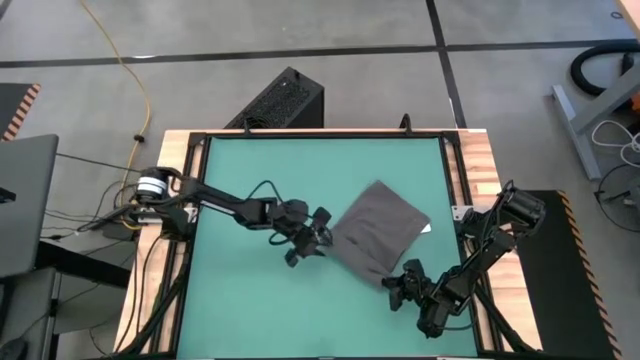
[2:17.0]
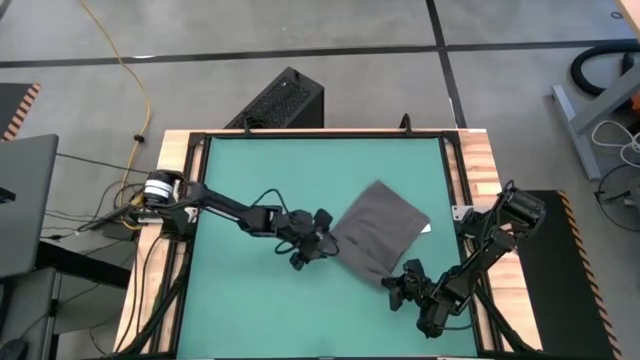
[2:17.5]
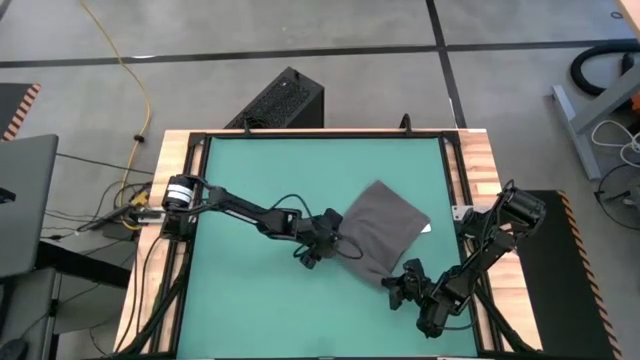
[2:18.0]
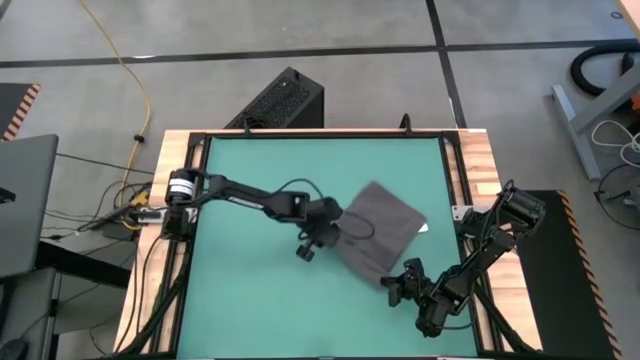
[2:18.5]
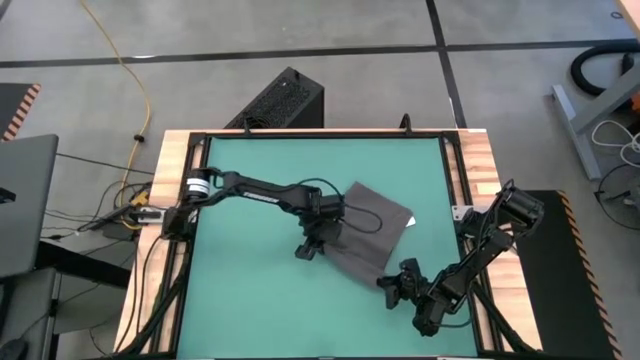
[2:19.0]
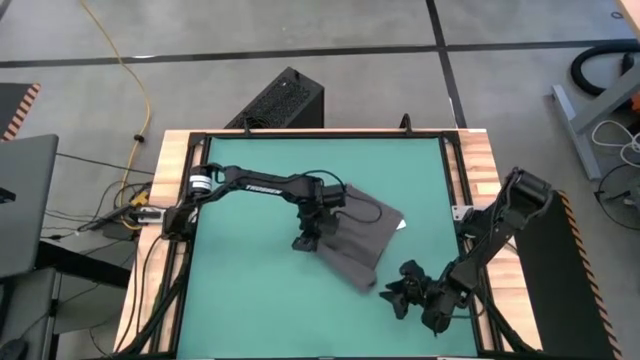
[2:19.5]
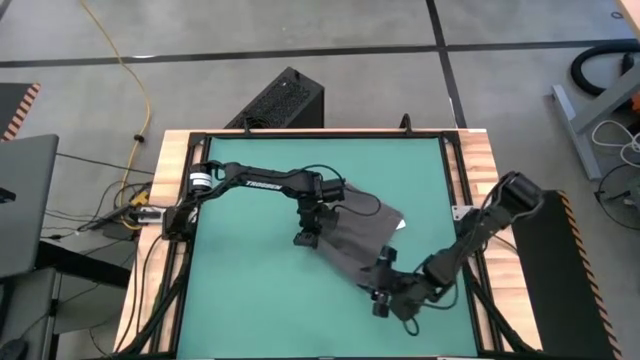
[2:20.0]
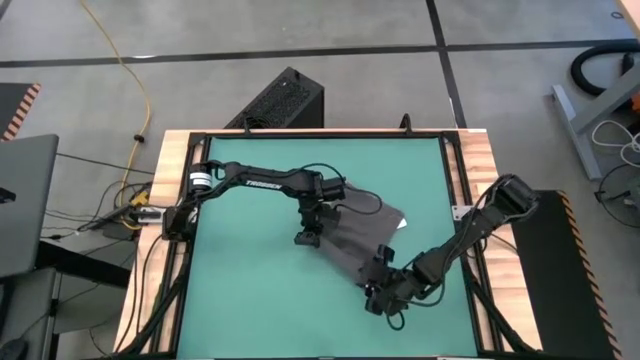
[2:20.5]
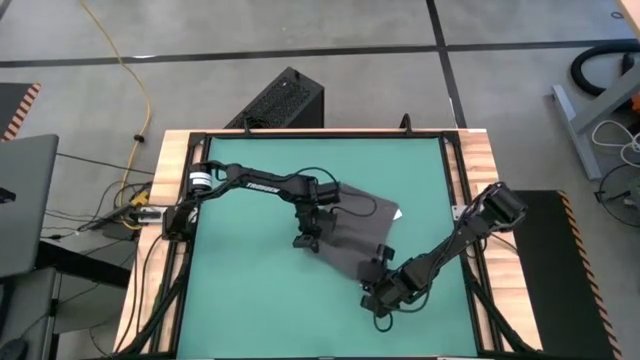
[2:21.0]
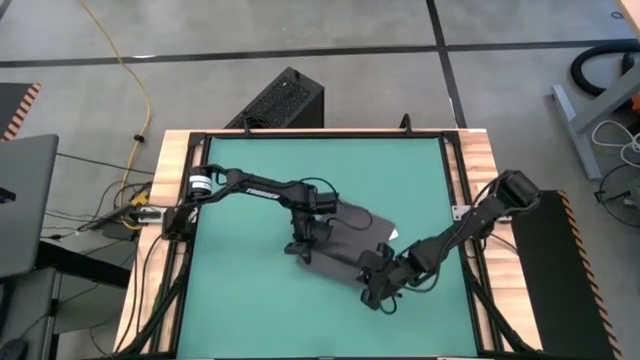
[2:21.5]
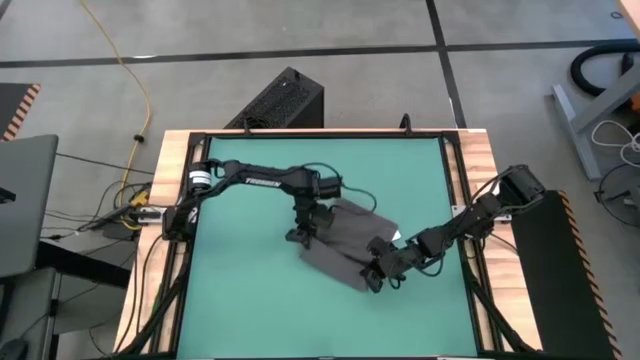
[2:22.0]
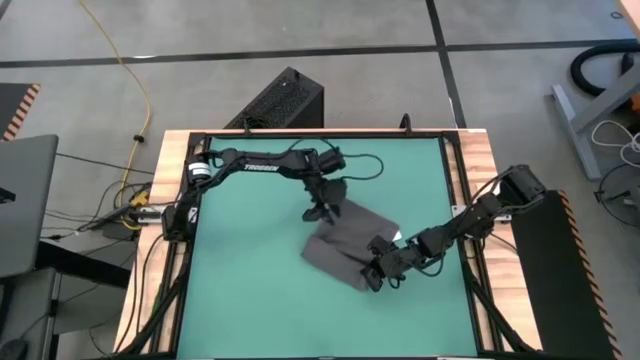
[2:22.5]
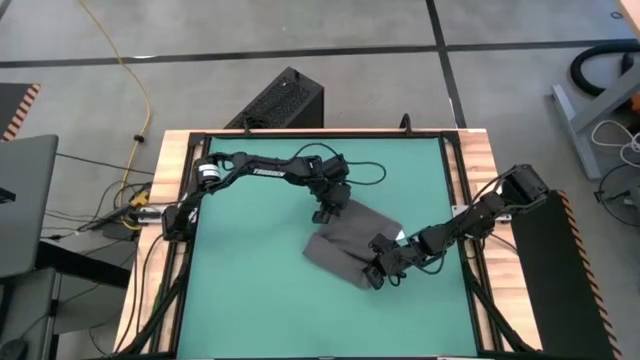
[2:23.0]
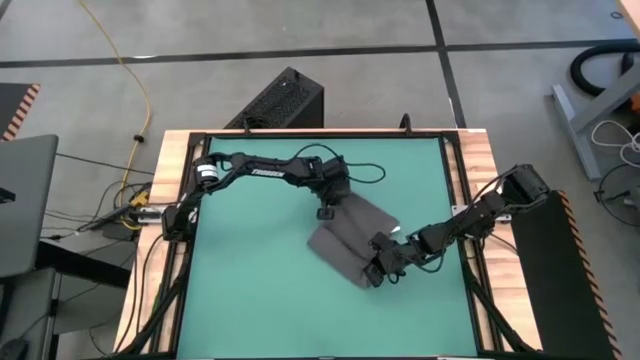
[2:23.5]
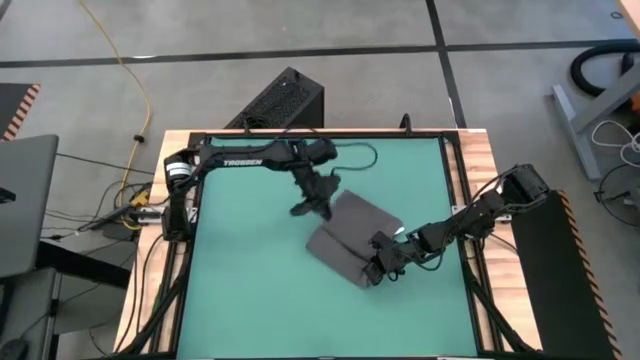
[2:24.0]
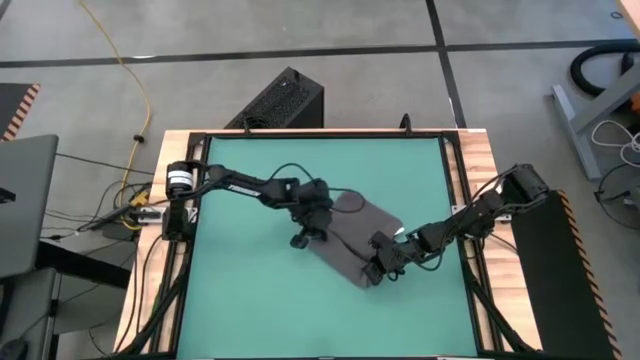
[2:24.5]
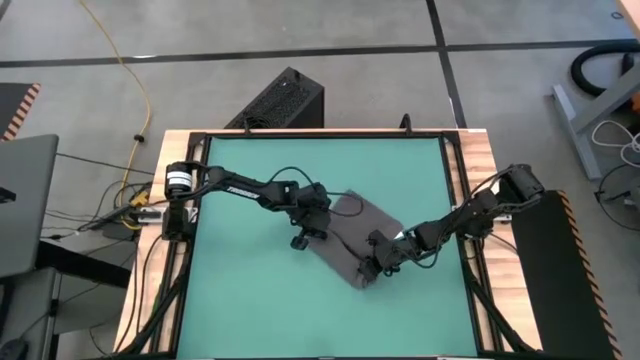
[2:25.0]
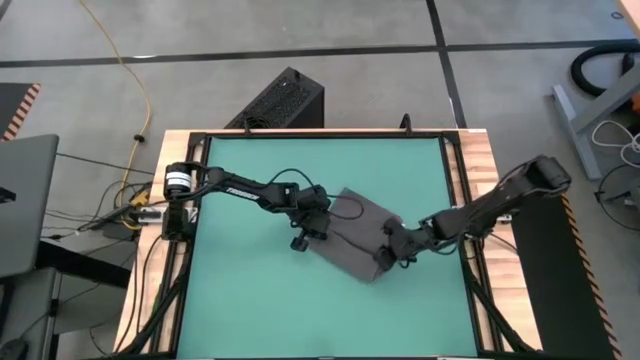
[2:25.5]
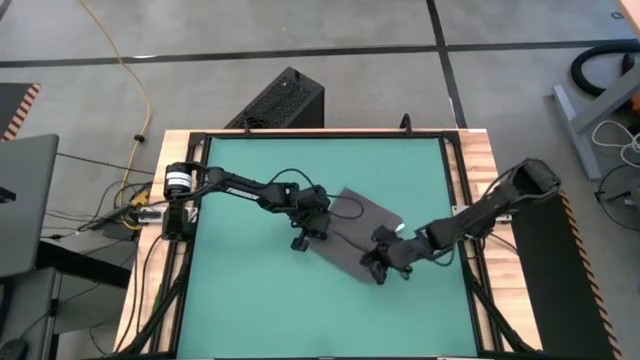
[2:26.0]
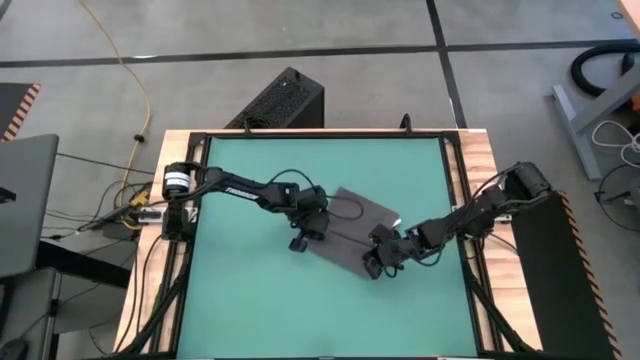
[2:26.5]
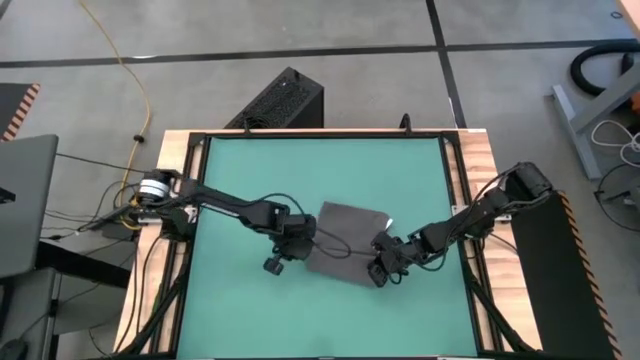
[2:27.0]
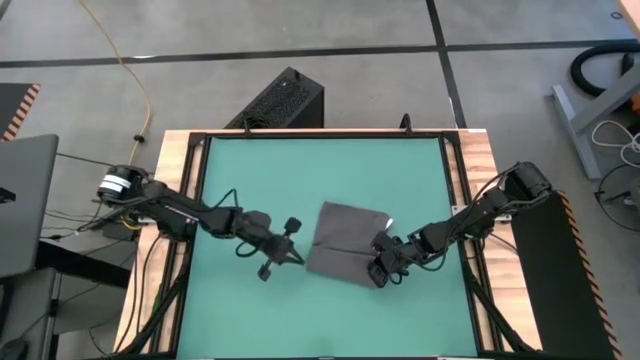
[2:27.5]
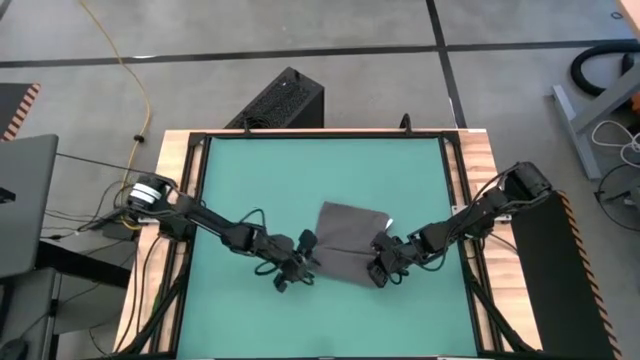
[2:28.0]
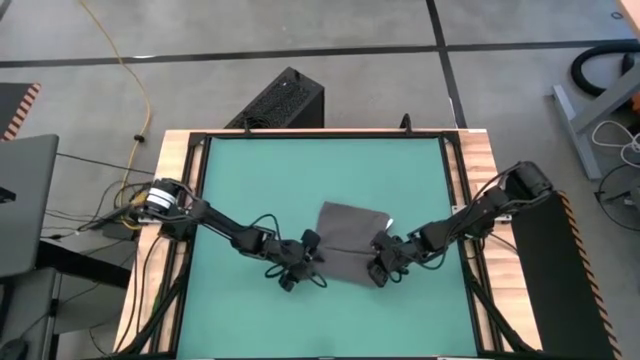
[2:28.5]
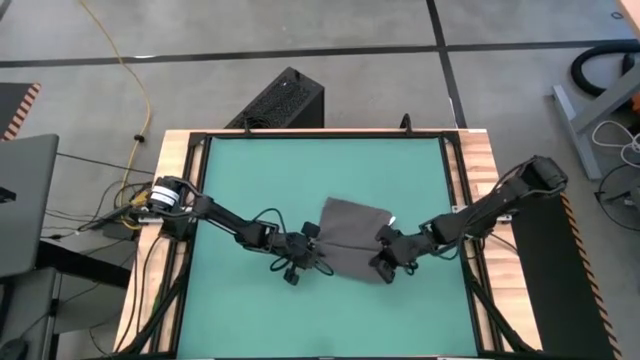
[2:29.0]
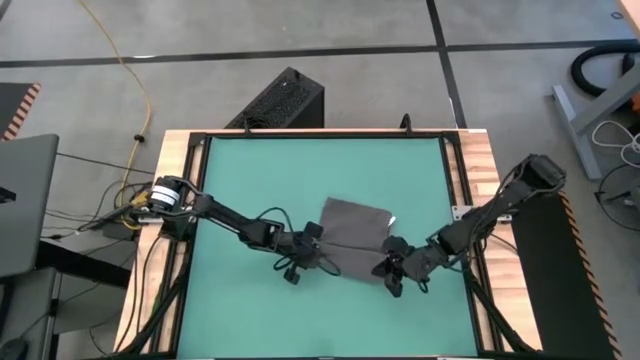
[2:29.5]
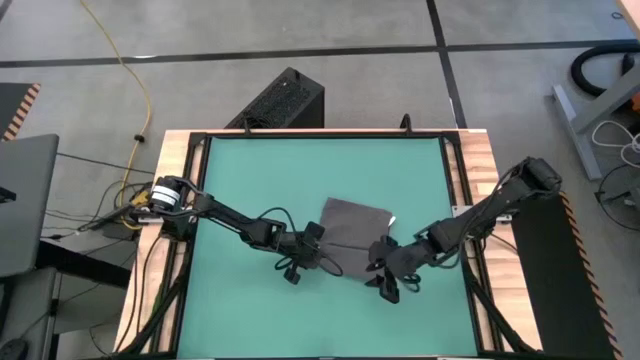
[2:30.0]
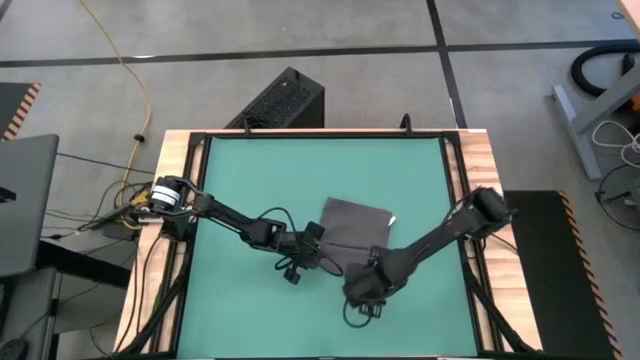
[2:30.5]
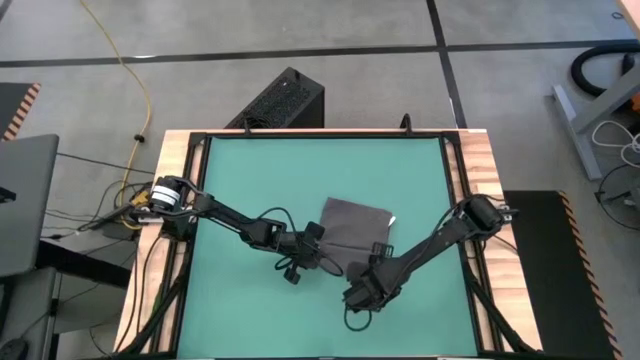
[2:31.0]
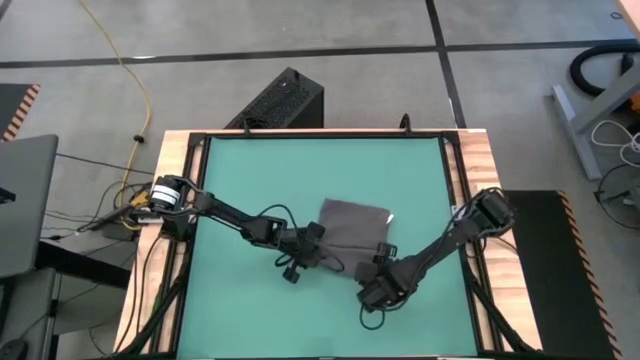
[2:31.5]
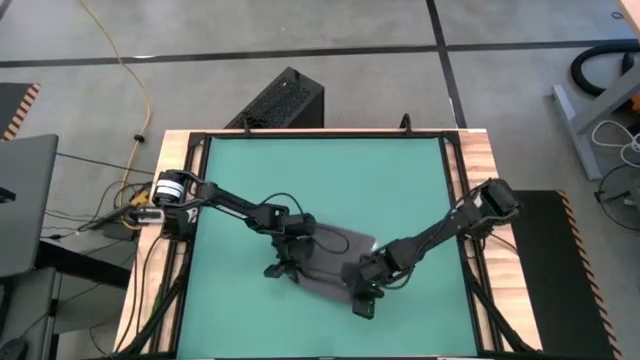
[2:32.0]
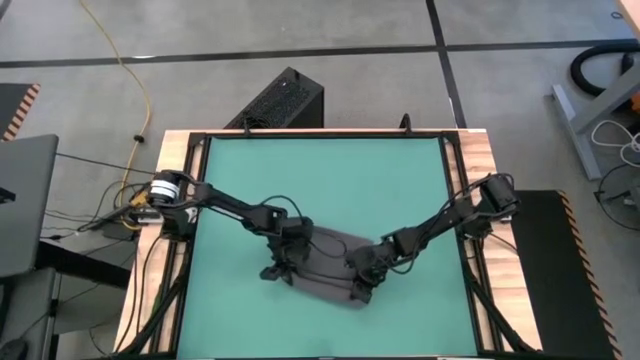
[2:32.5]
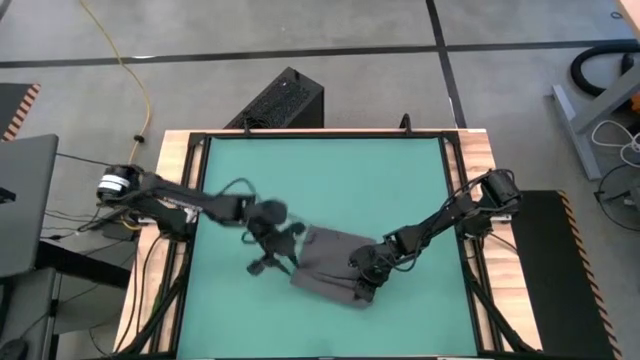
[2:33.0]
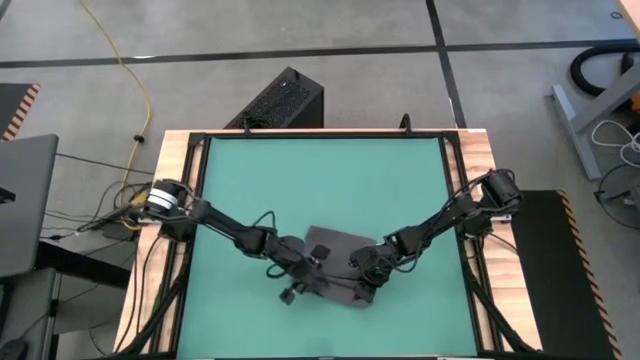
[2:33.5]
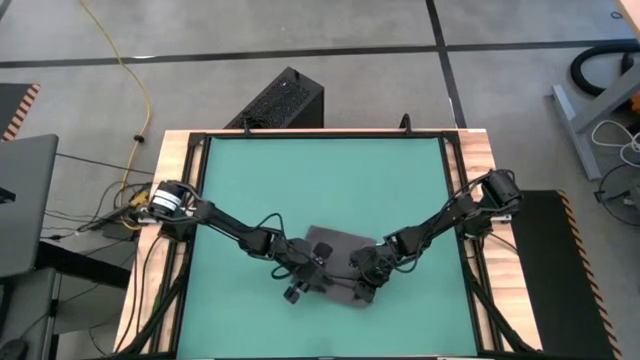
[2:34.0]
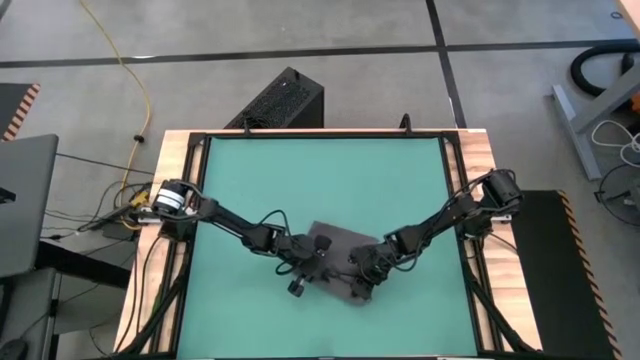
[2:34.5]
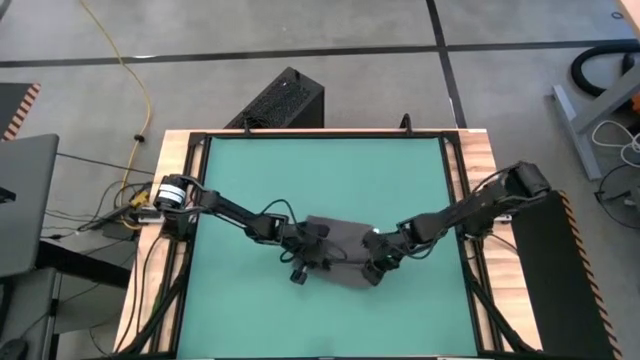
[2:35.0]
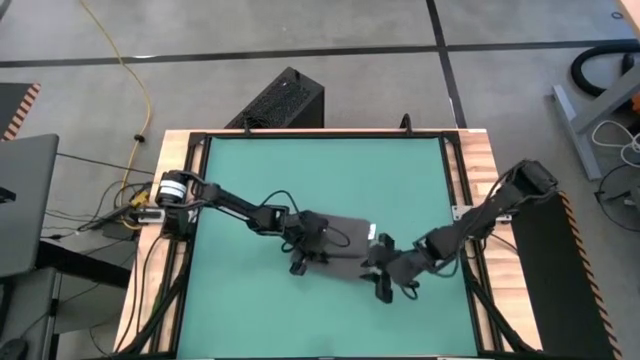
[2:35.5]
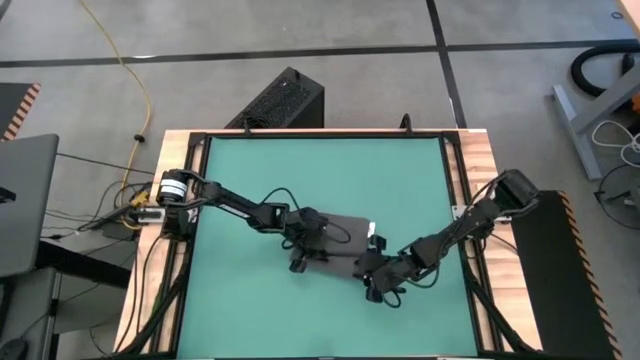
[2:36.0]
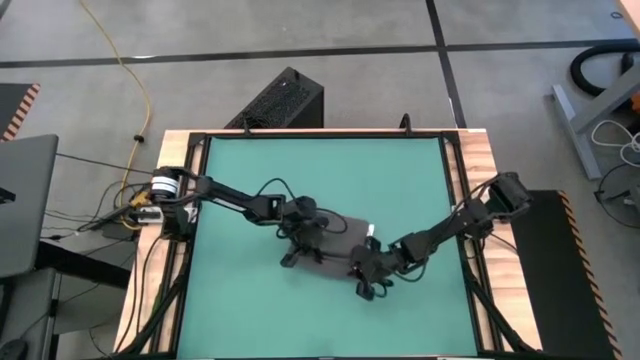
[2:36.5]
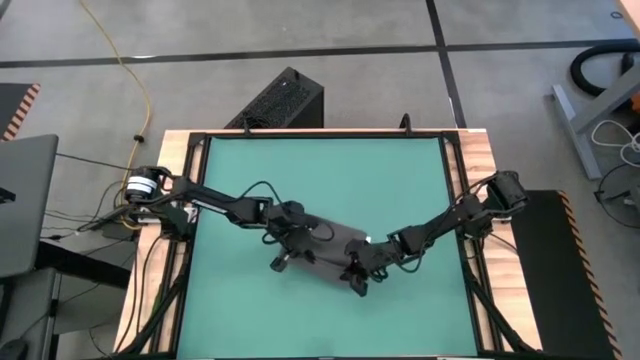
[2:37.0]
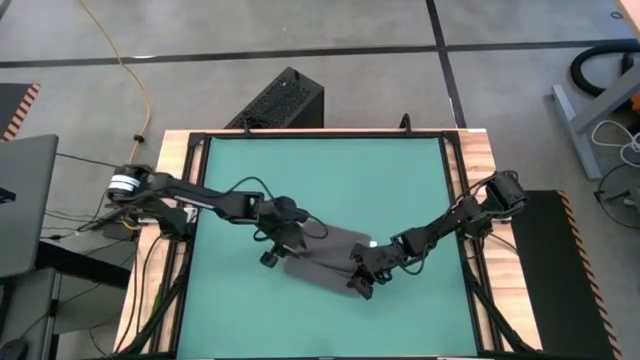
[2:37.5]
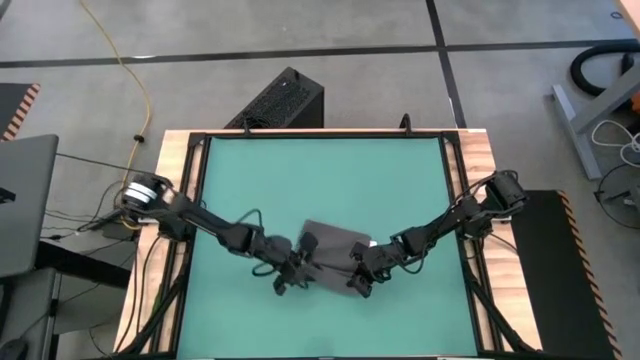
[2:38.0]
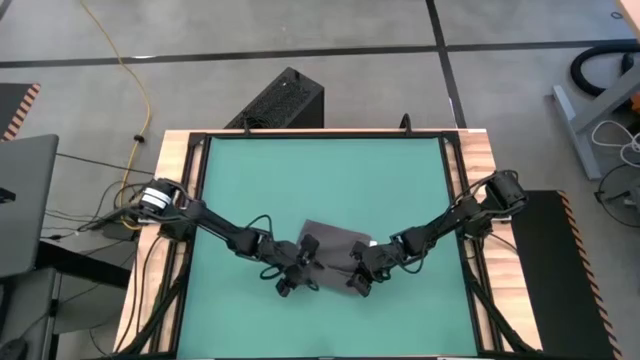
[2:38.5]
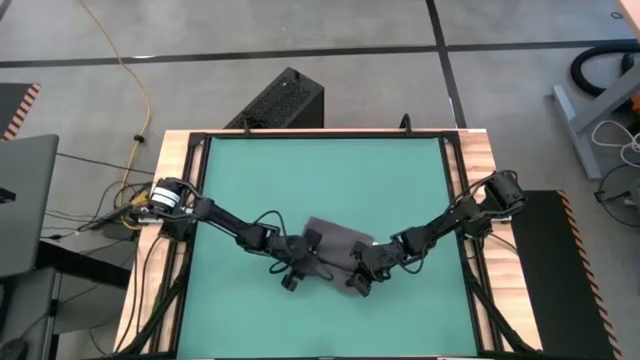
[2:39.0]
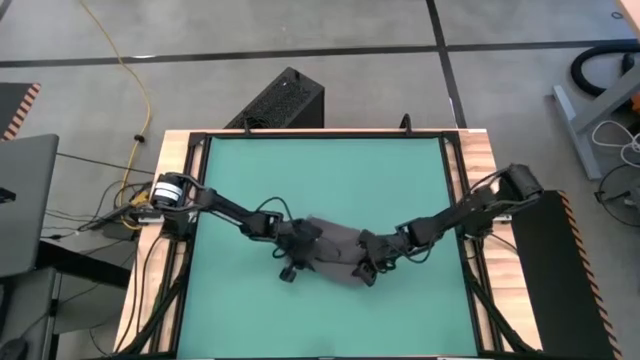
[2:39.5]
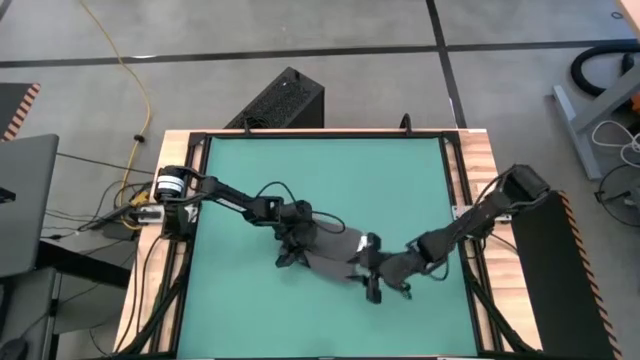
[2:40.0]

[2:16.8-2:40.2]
Task: Roll towel into tight, uniform cylinder
Roll the gray towel
